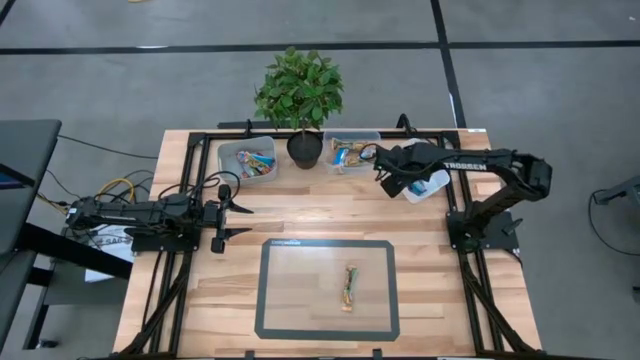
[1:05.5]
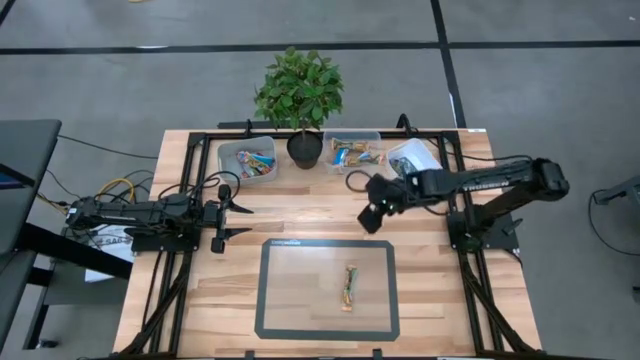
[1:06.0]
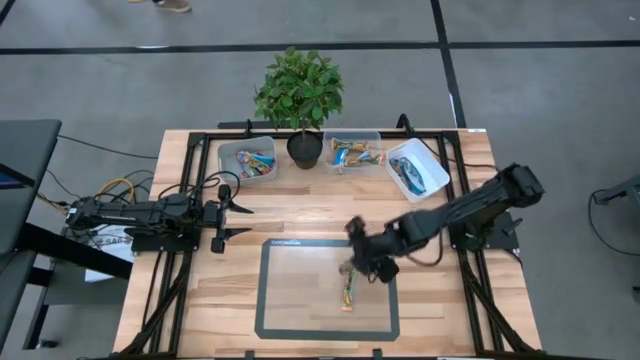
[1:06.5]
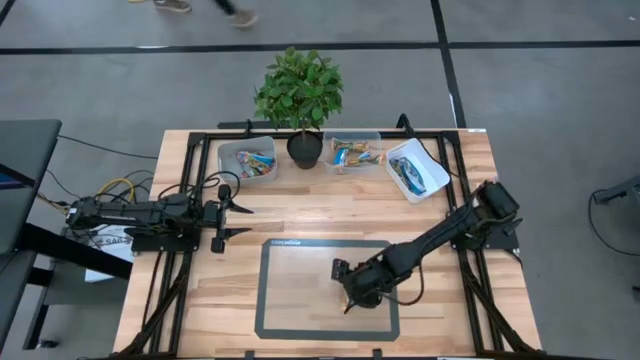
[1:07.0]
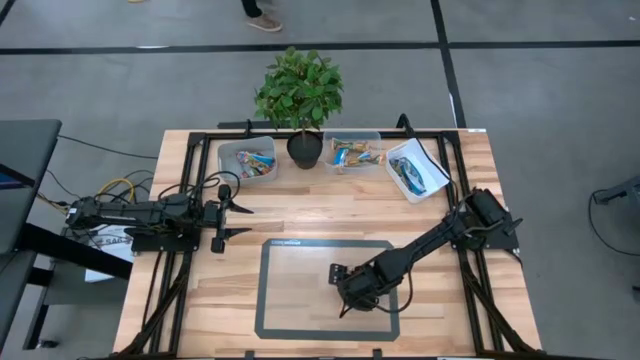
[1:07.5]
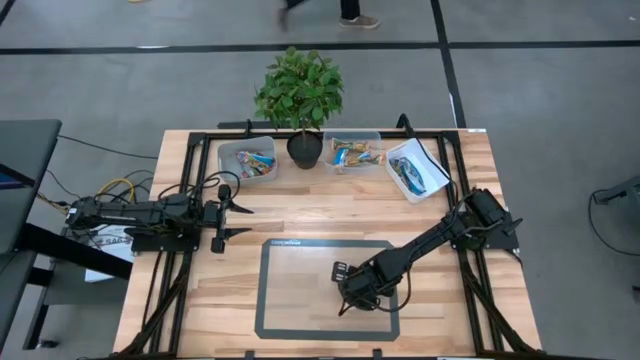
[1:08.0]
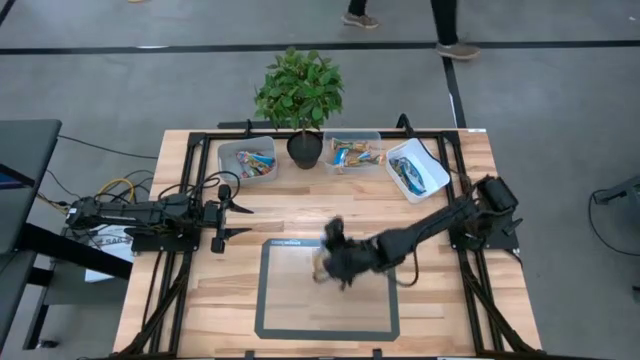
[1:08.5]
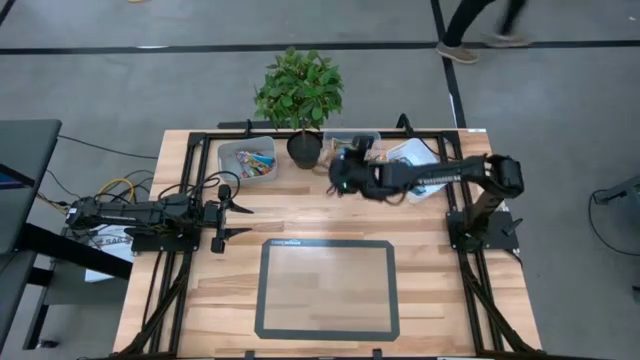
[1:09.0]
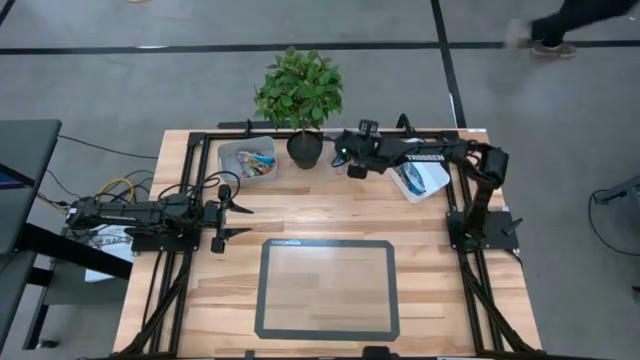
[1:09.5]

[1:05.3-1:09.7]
Task: Pick and place Granola Bars by type
Put the yellow granola bar into the transparent bin

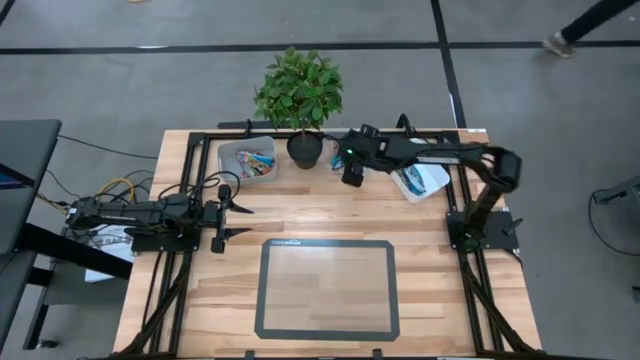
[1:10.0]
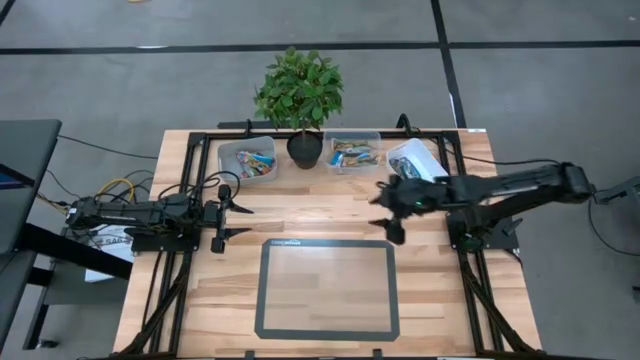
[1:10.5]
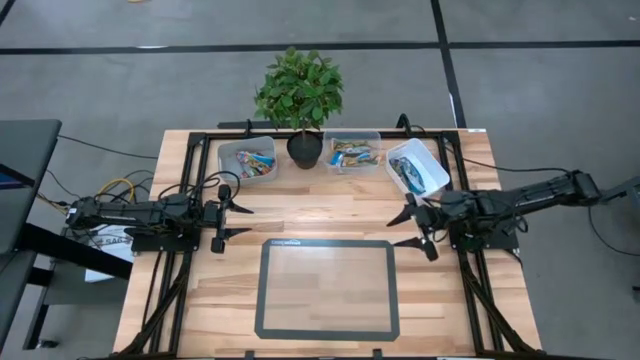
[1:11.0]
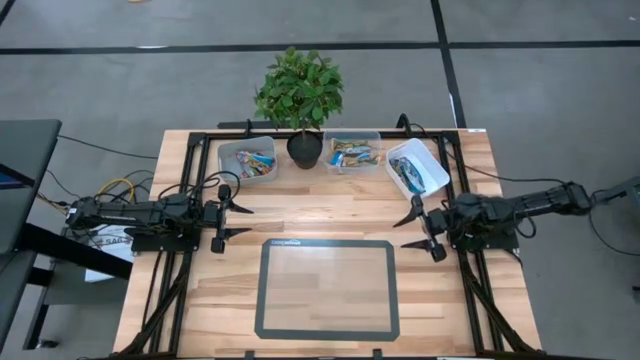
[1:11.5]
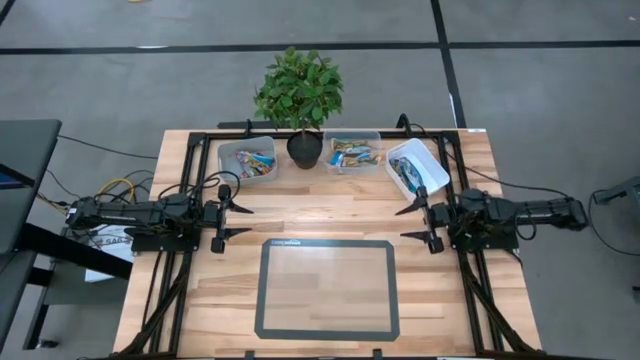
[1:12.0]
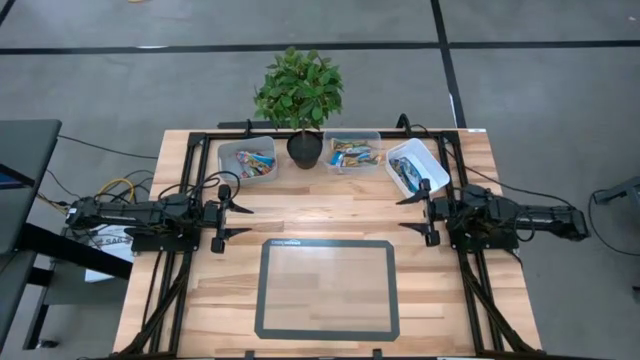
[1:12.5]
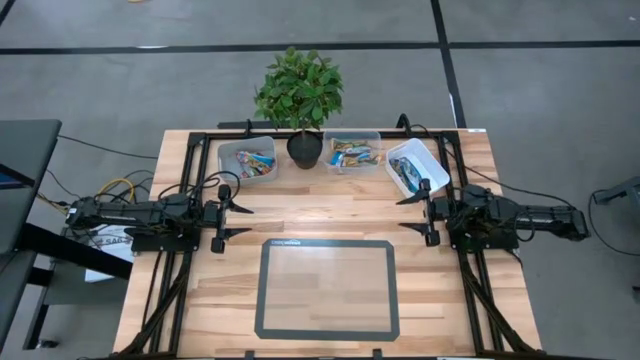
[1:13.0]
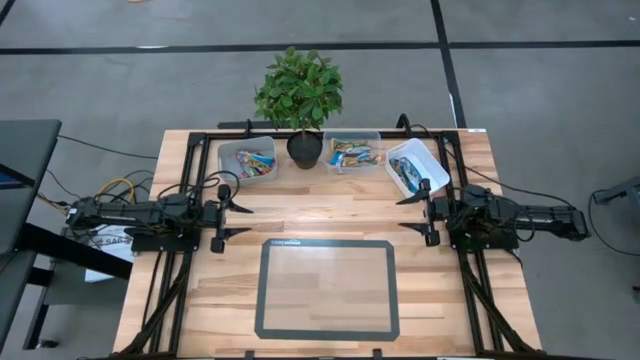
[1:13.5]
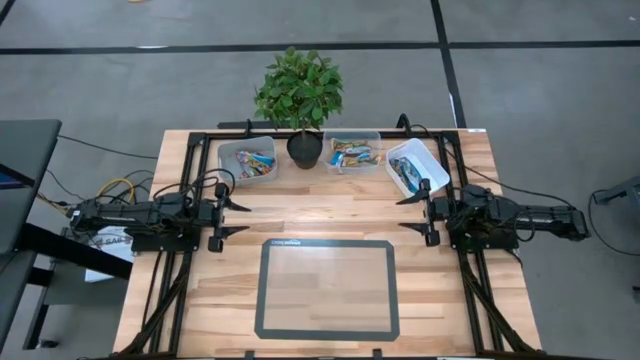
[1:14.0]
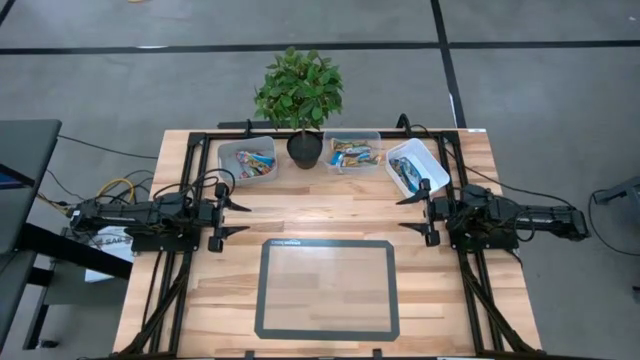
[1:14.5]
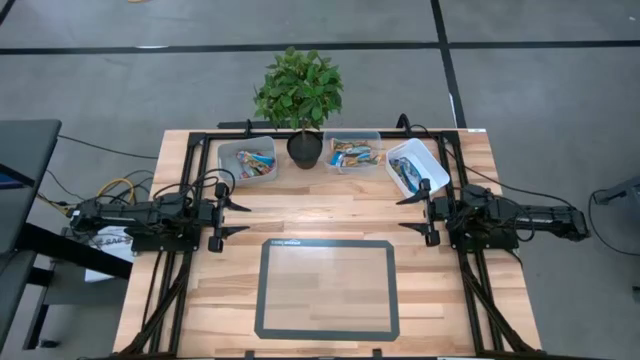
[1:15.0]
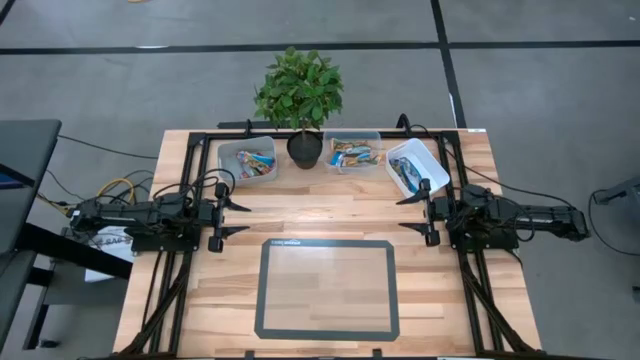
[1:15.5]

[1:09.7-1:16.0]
Return to Home Position

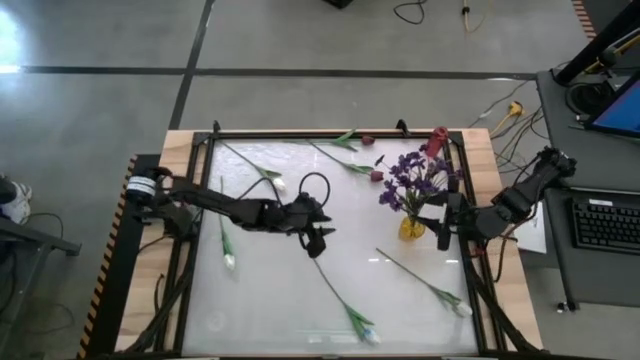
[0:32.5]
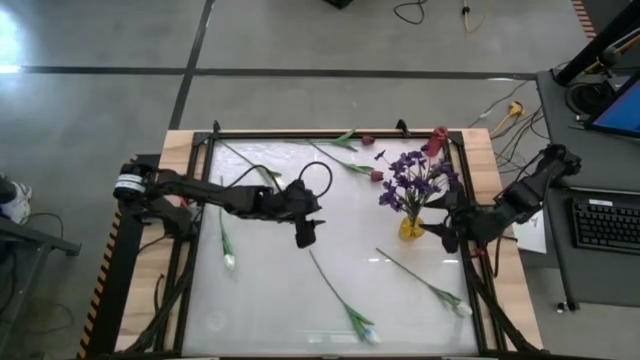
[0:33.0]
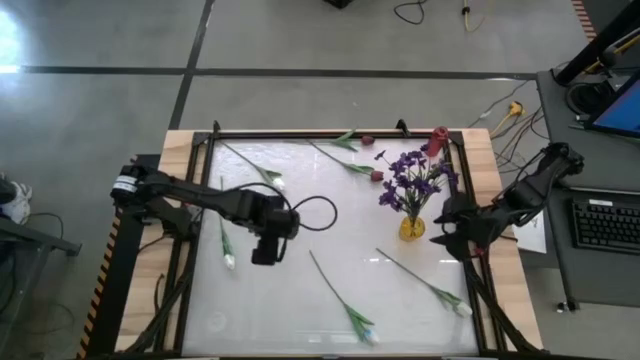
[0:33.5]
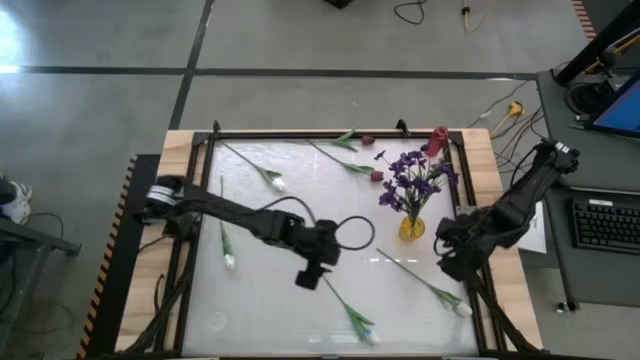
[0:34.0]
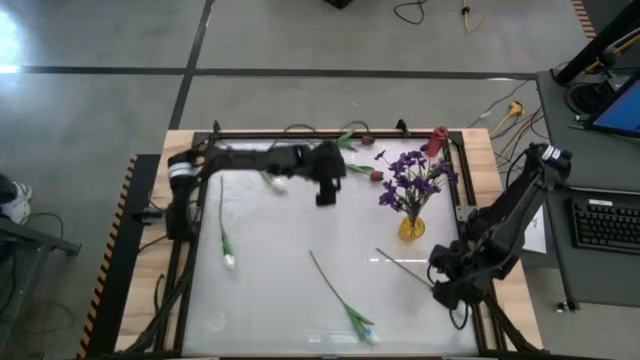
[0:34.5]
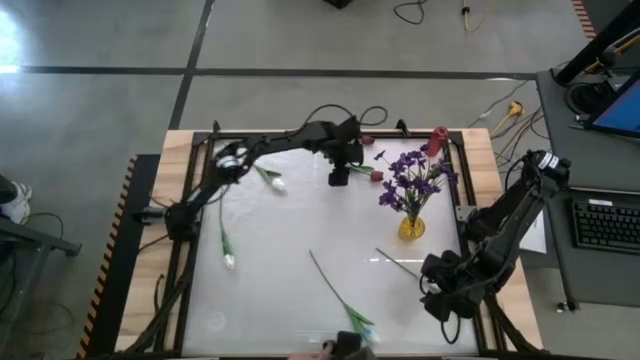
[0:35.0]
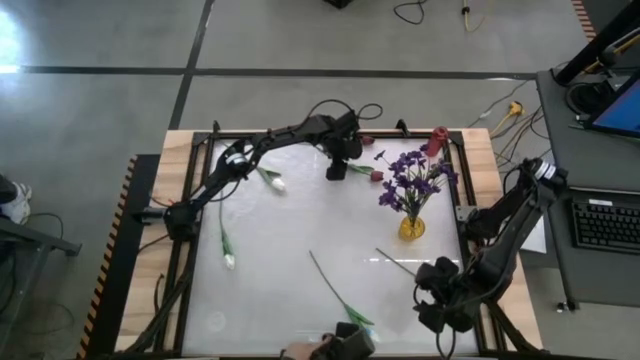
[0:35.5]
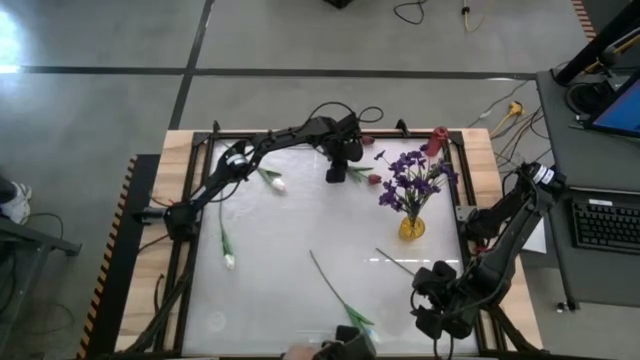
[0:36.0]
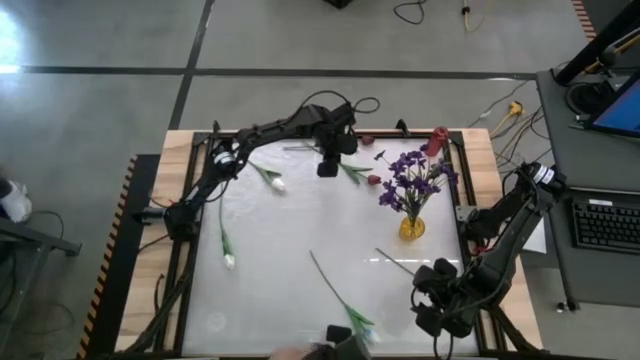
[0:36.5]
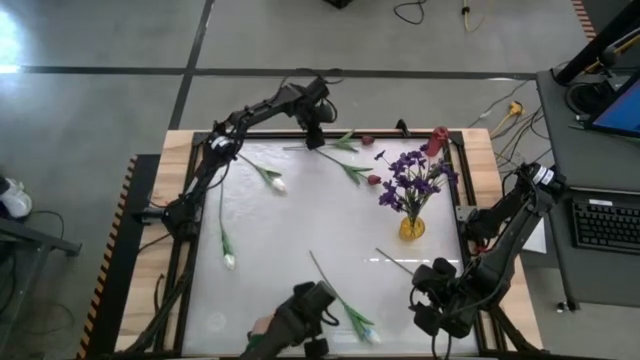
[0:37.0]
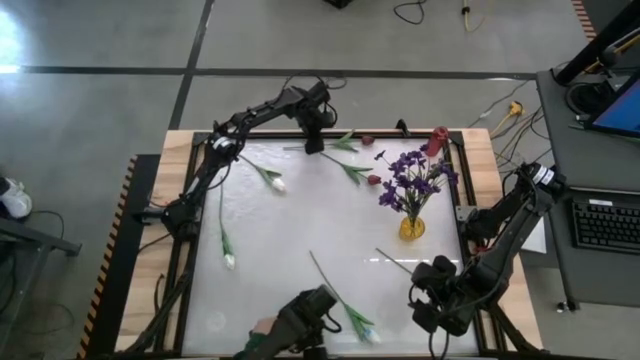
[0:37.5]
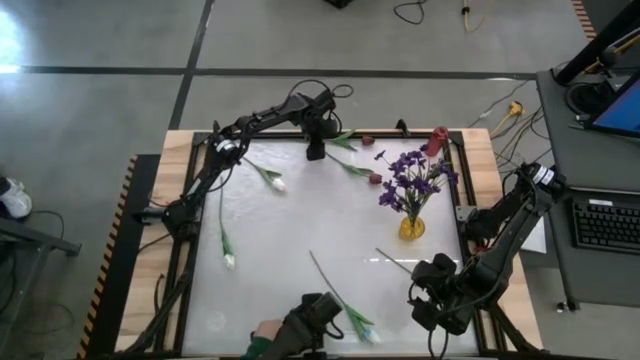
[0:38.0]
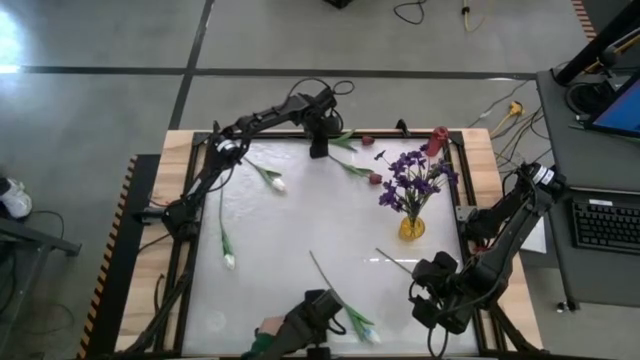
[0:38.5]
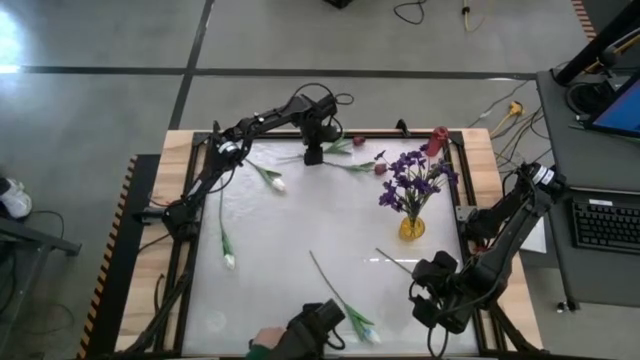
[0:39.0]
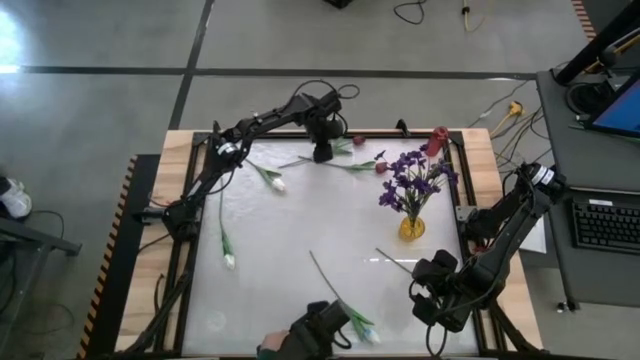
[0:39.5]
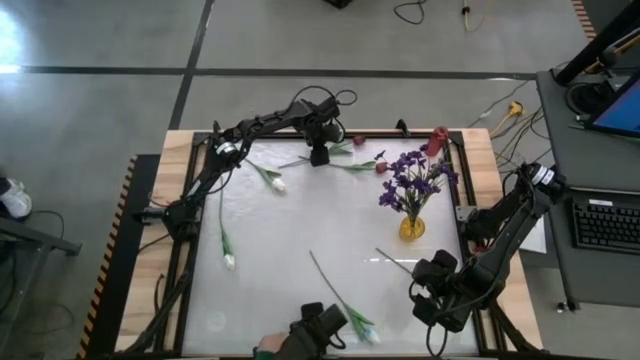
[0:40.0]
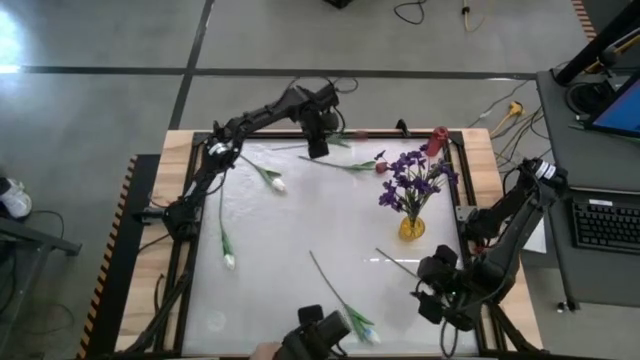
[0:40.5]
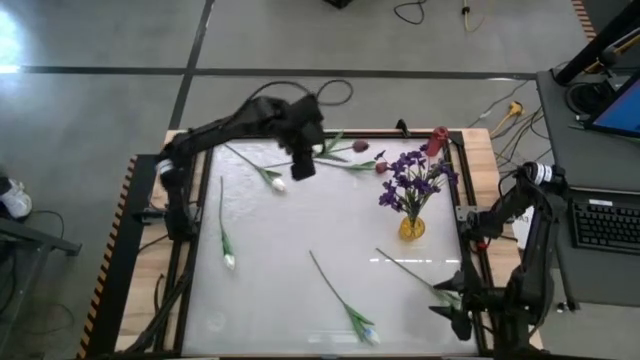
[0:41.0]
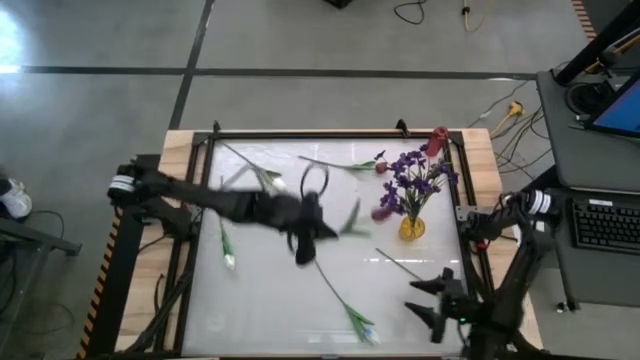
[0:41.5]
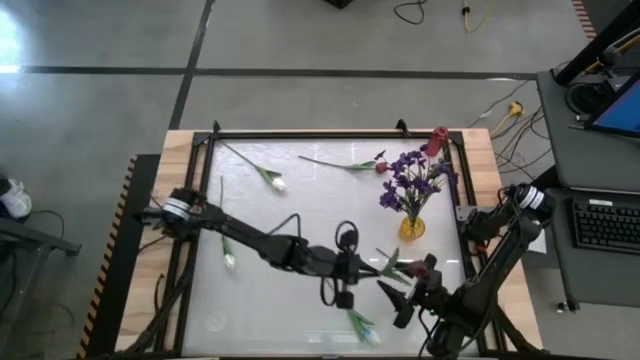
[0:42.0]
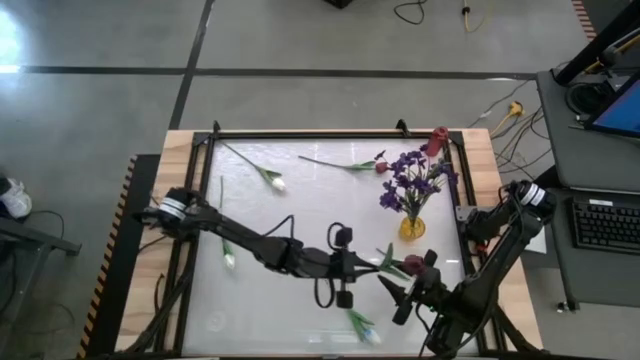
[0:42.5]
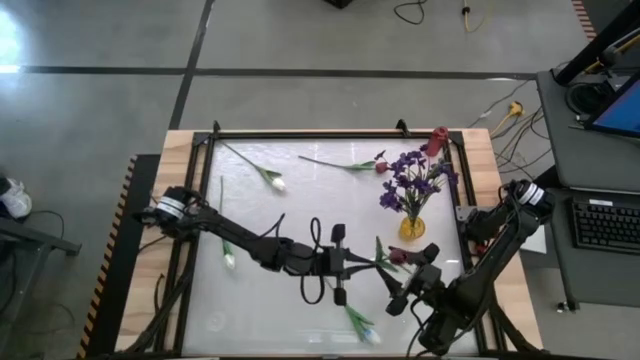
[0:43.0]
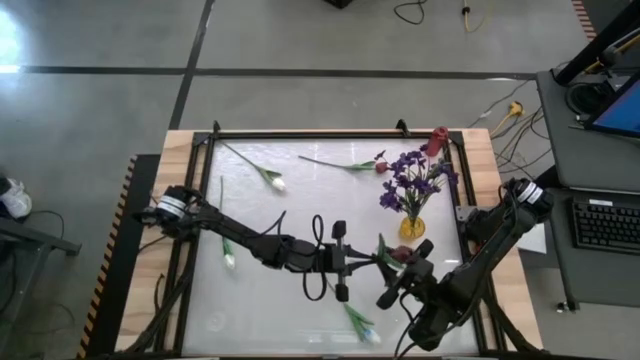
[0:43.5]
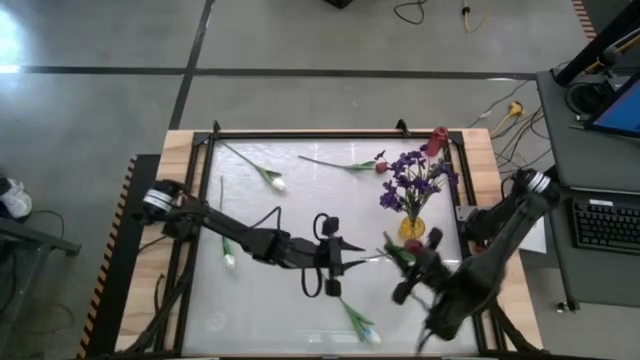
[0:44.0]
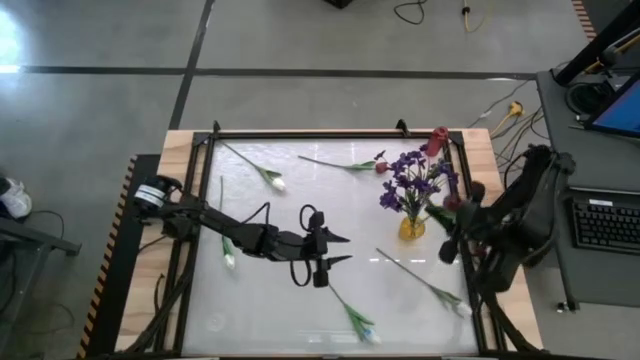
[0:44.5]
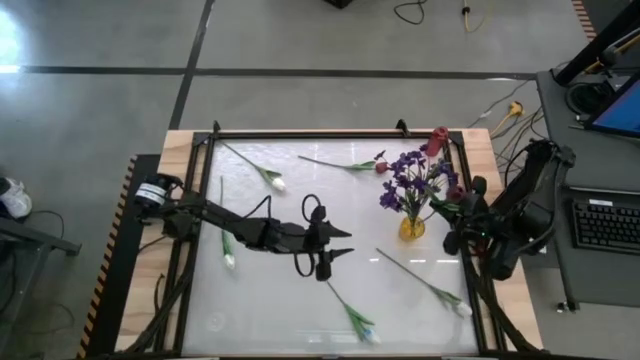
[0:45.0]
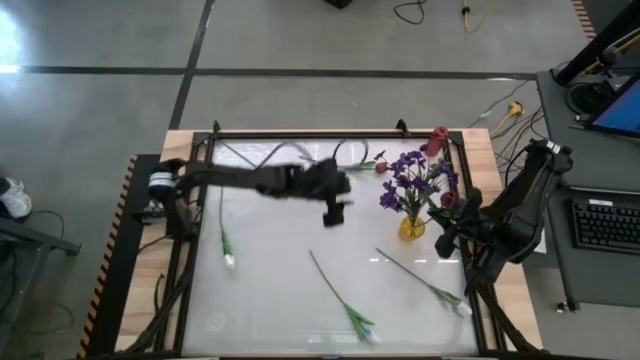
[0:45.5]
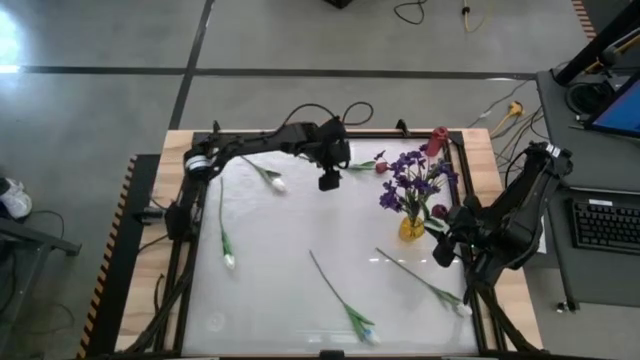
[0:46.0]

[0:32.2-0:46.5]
Task: Sort flowers into vase by color
Put the top red flower into the yellow vase
